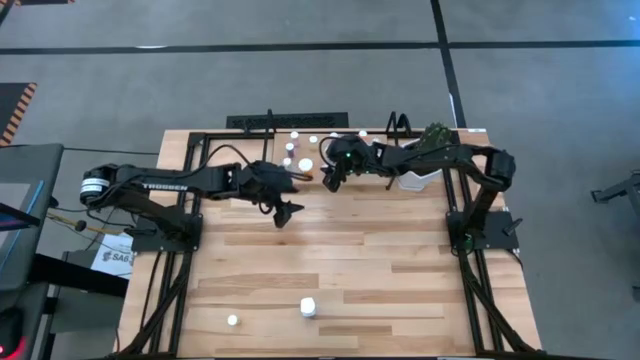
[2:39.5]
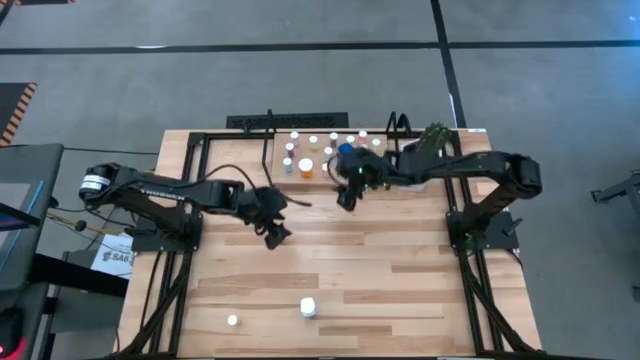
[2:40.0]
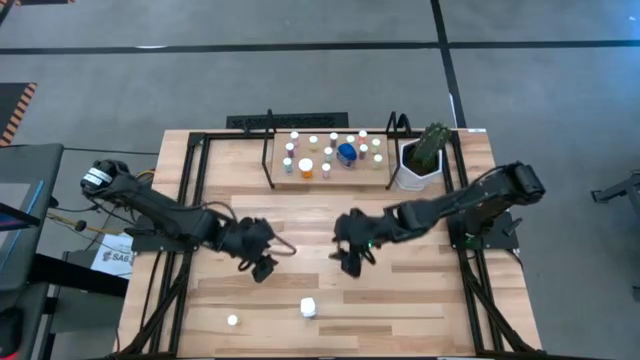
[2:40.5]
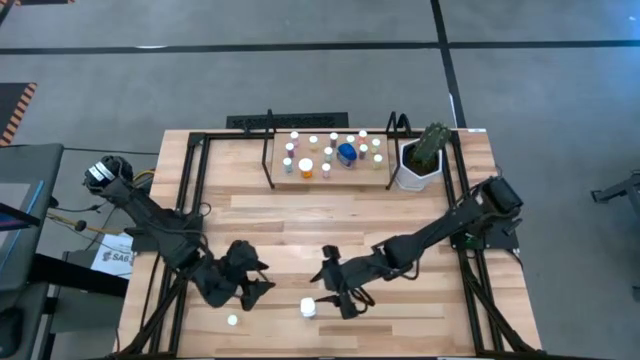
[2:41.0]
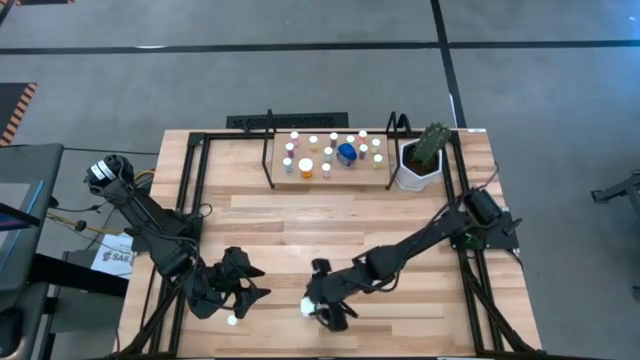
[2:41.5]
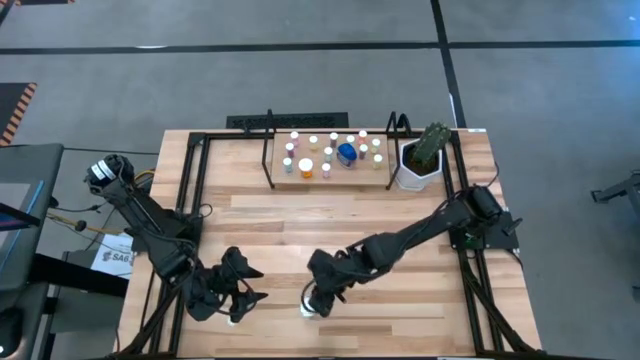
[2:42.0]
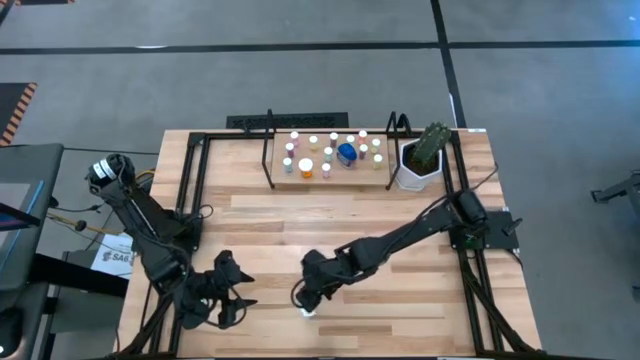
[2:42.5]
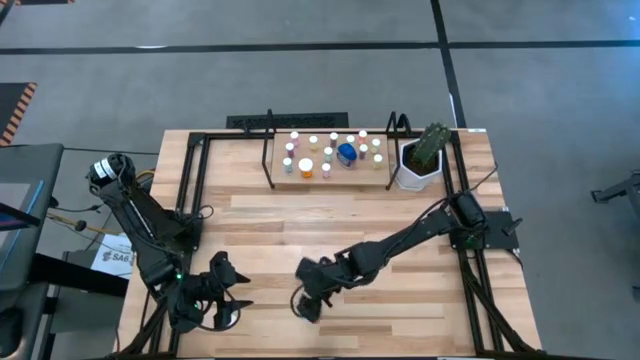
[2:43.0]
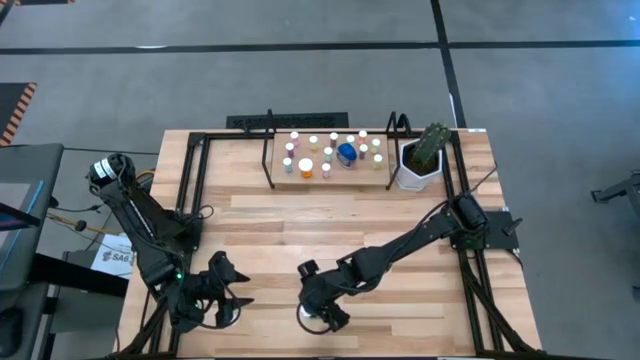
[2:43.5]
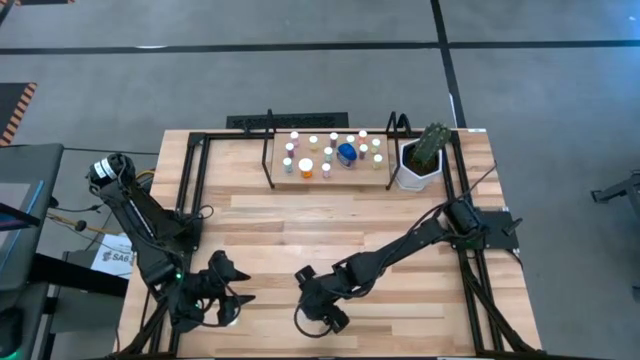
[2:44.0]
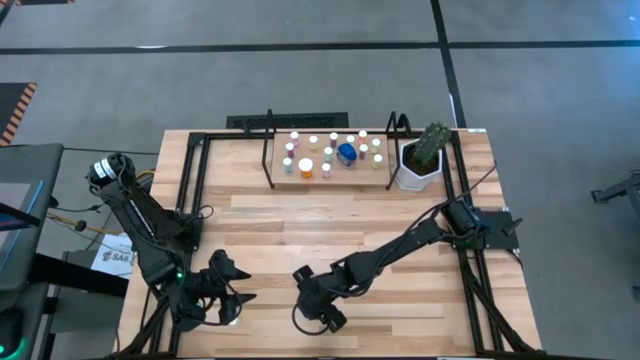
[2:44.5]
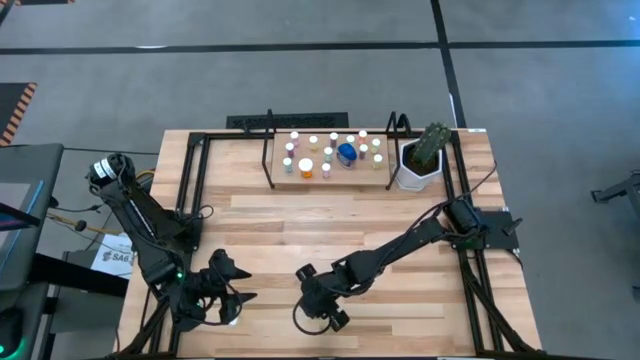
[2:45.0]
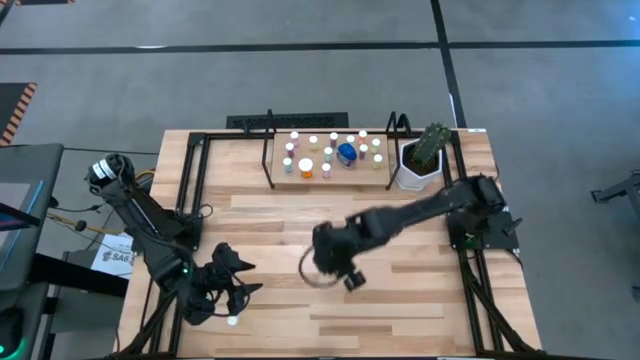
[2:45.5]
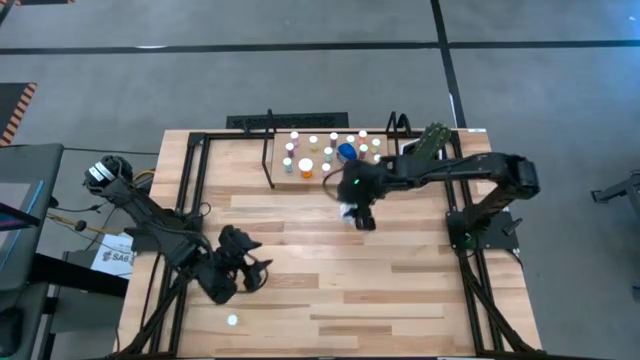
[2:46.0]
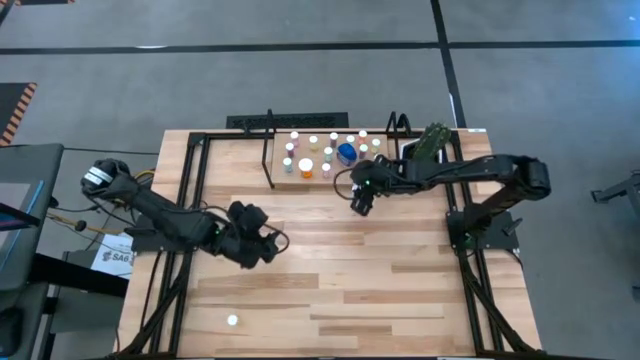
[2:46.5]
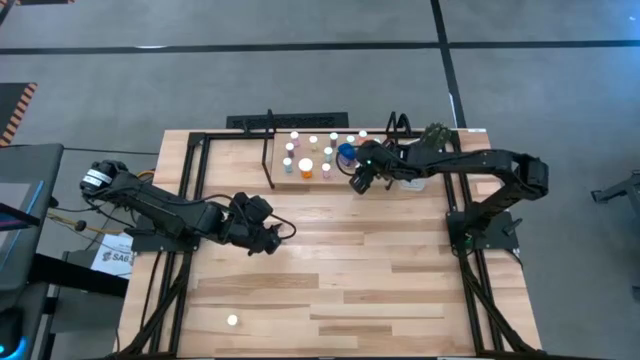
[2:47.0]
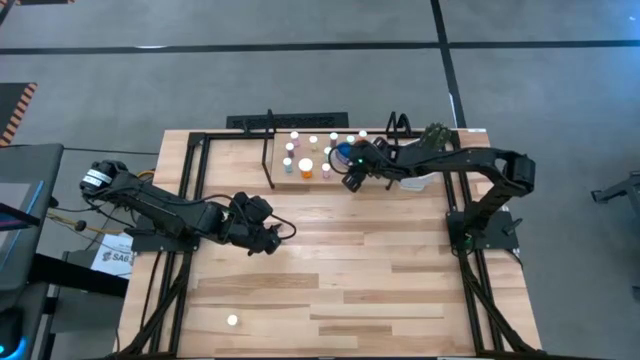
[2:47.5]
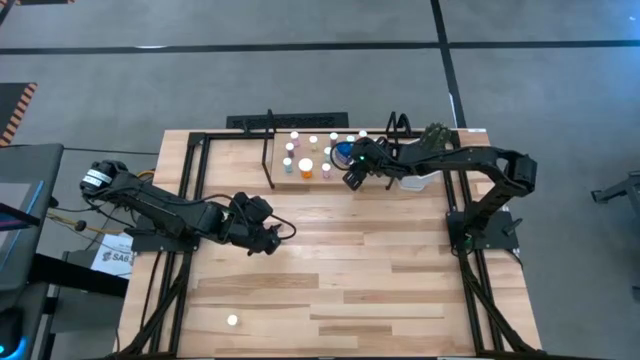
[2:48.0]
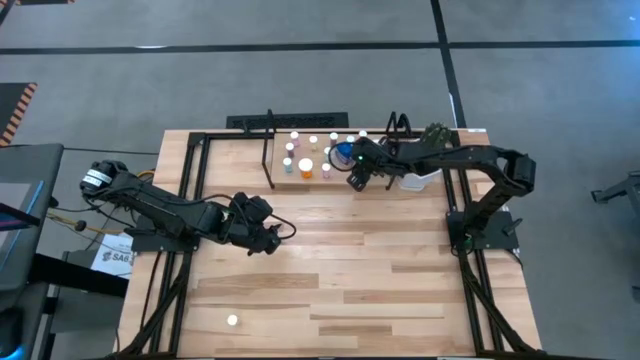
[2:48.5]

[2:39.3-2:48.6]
Task: Pick and place medicine bottles onto shelf by color
Put the white pill bottle on the shelf

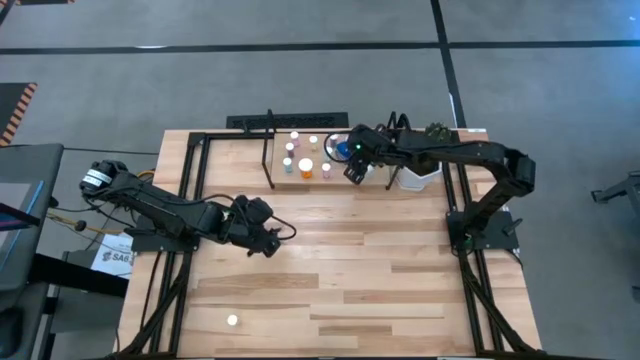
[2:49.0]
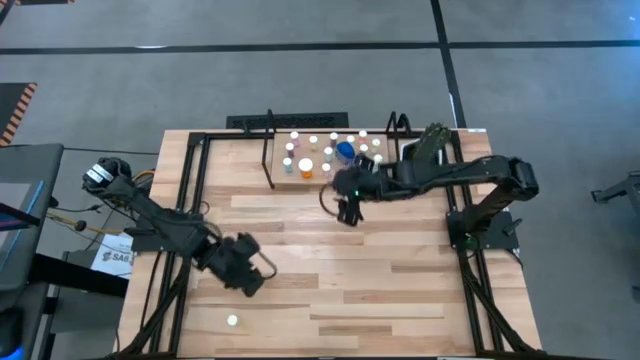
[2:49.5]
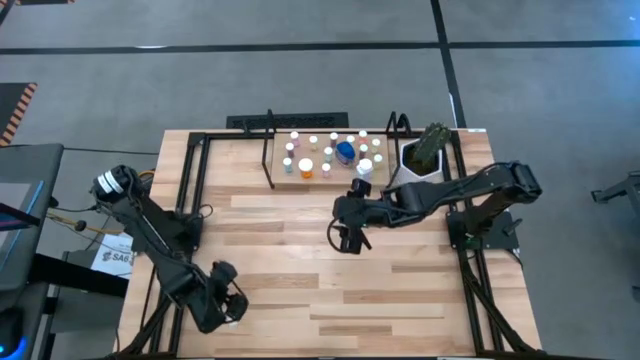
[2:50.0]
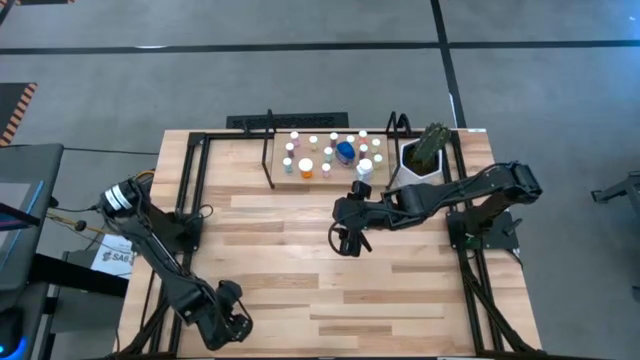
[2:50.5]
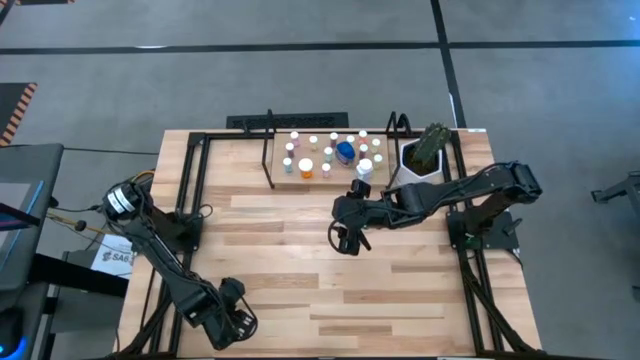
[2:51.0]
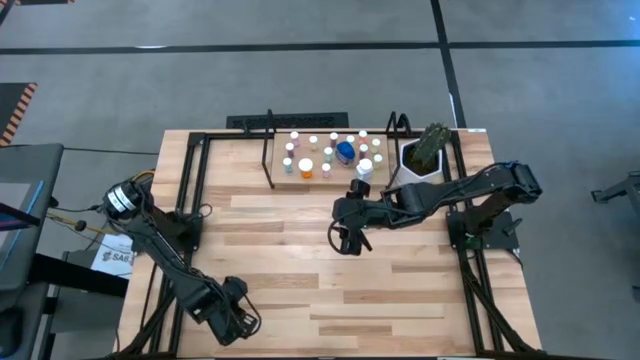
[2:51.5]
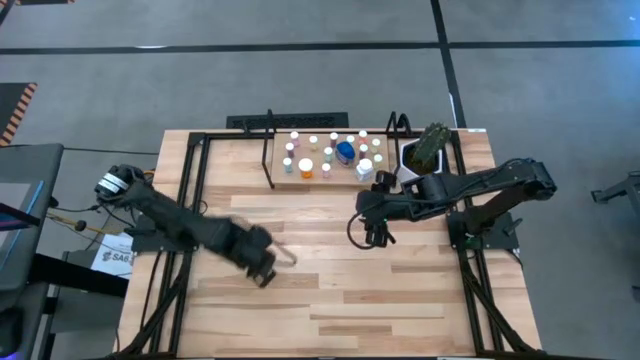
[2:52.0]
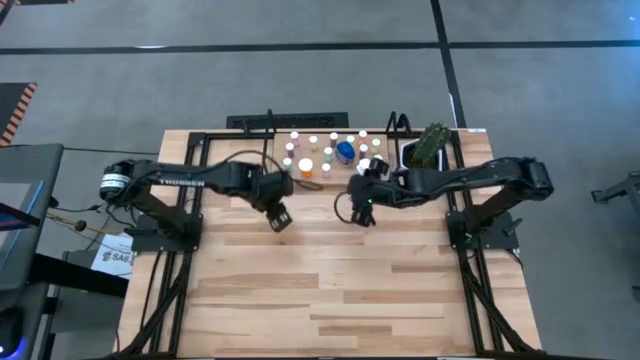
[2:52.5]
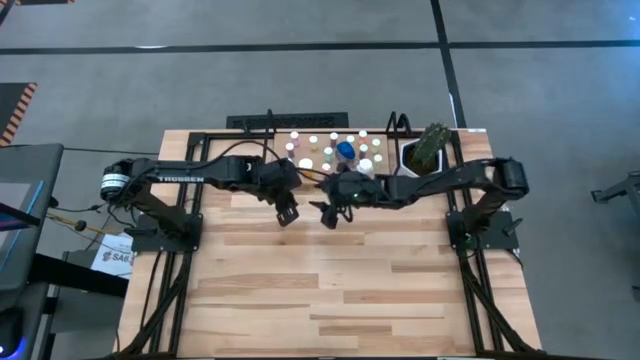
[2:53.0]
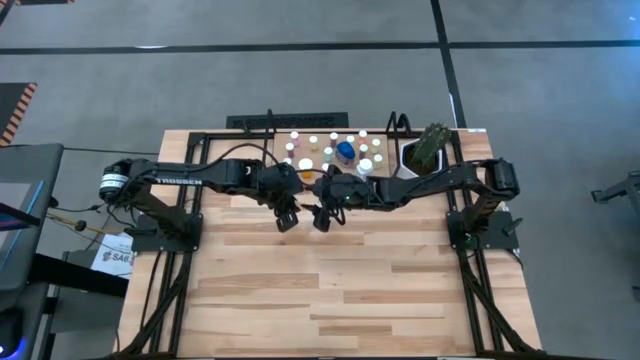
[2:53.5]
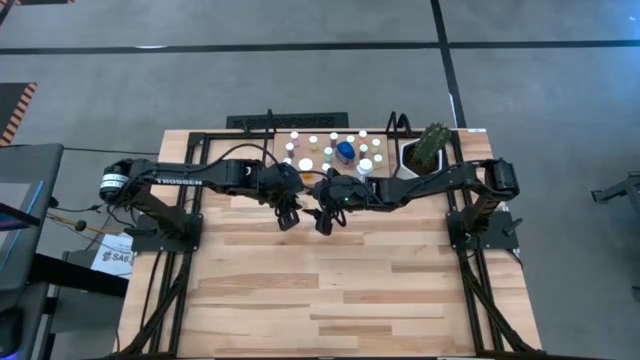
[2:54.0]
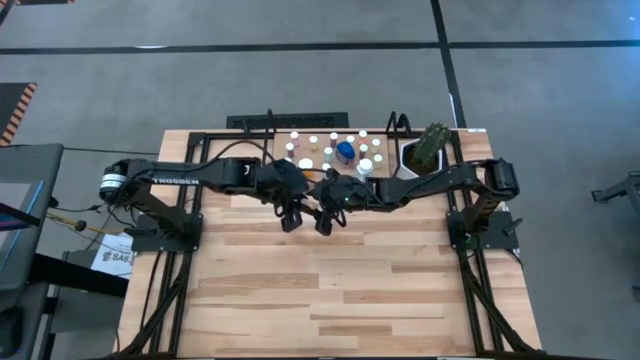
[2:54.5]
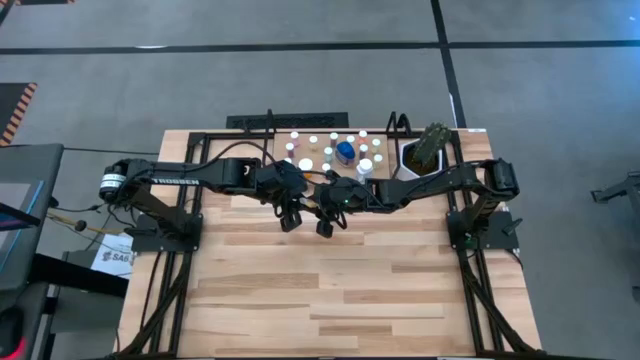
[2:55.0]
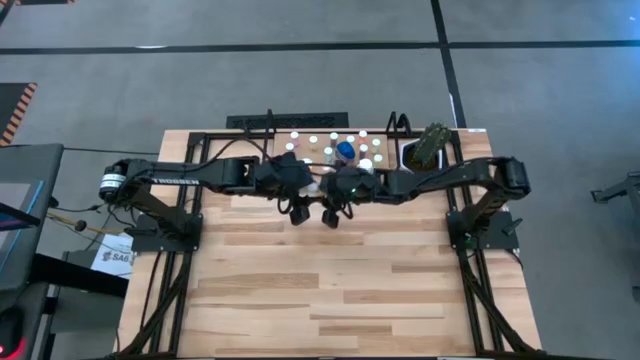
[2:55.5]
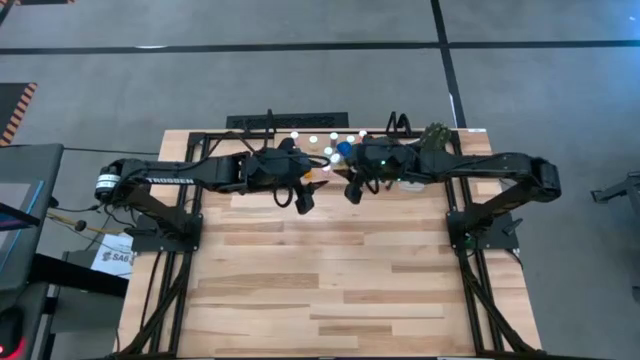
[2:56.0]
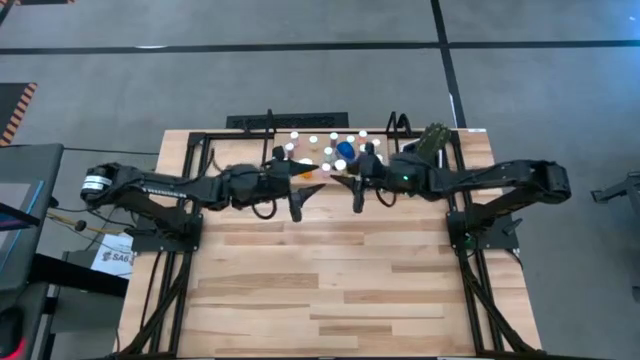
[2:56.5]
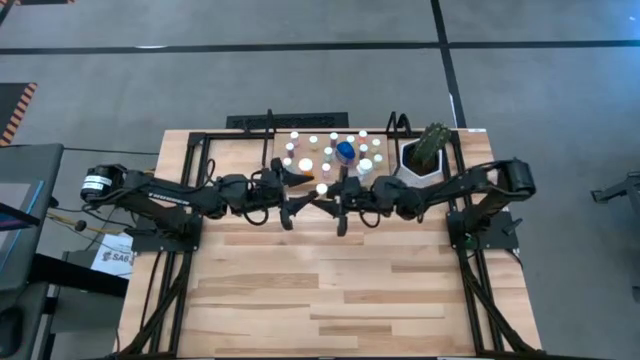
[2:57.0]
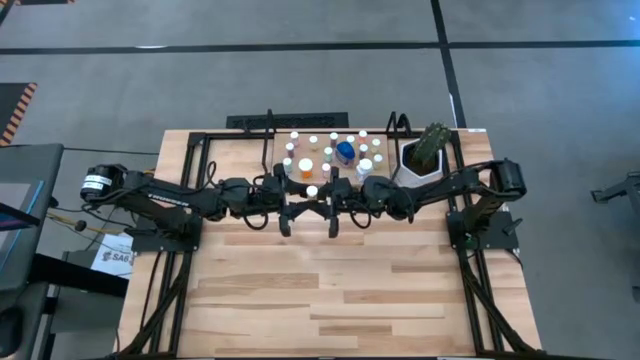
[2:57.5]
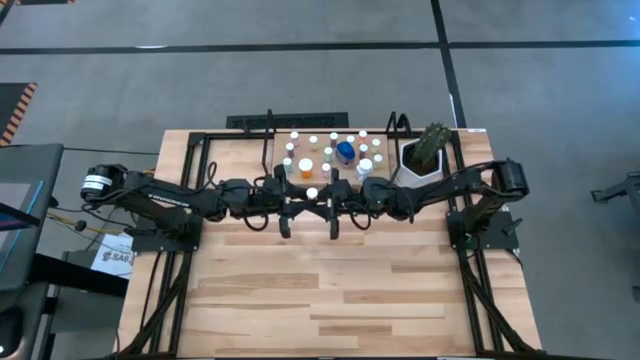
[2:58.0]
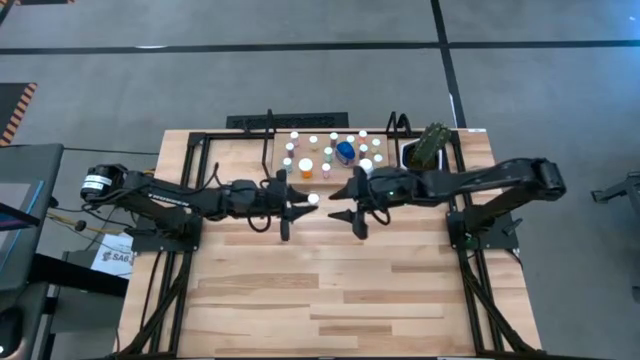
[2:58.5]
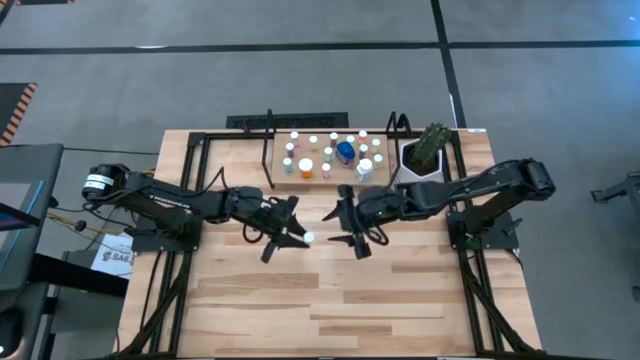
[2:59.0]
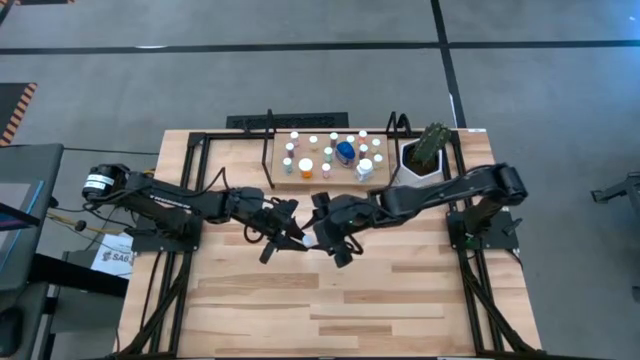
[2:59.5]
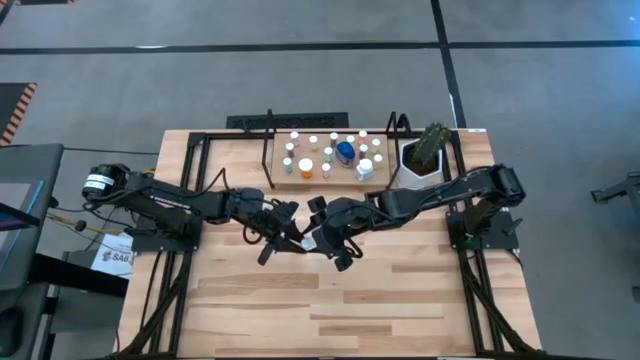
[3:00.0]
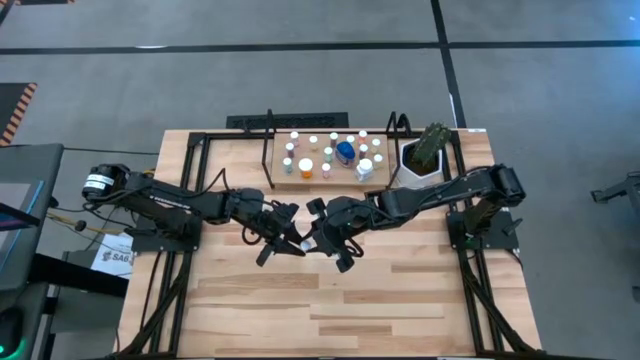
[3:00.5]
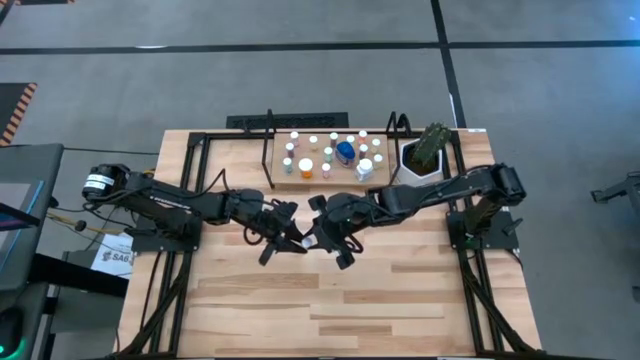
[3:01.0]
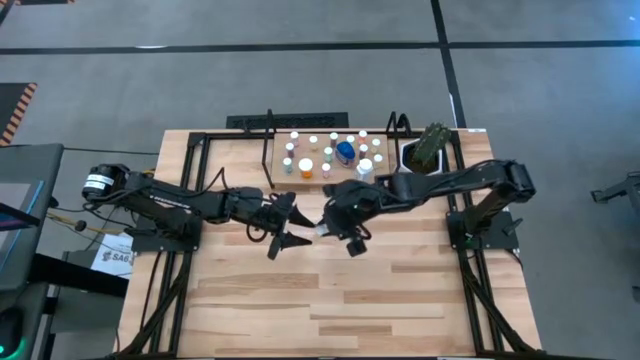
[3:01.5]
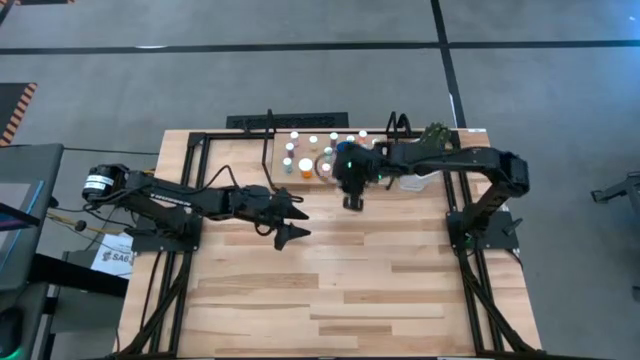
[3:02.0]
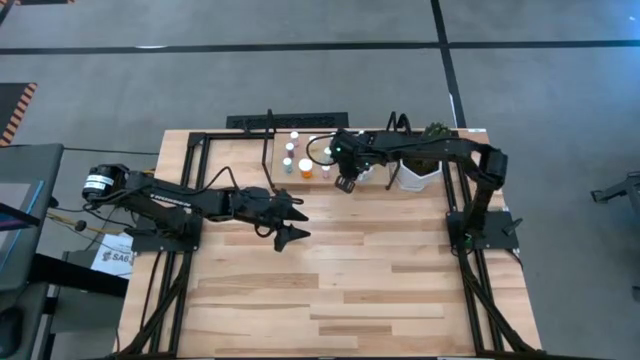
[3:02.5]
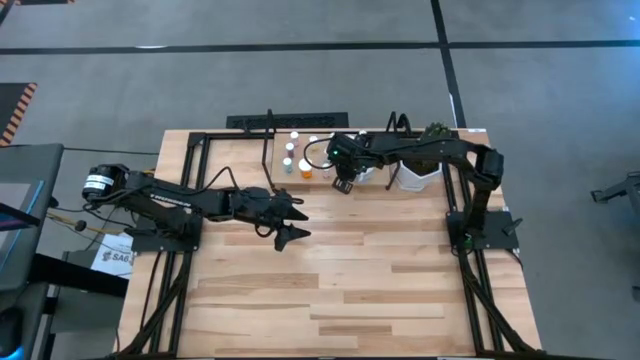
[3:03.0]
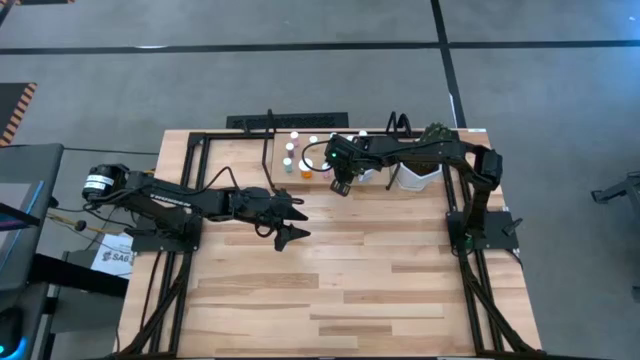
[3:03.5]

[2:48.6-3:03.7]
Put the yellow pill bottle on the shelf
